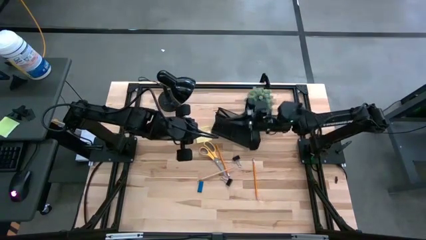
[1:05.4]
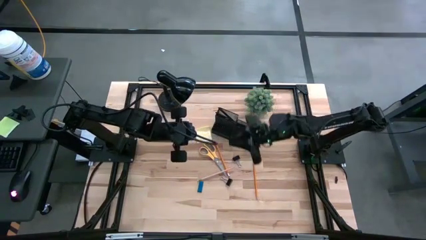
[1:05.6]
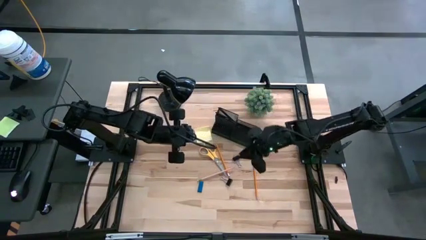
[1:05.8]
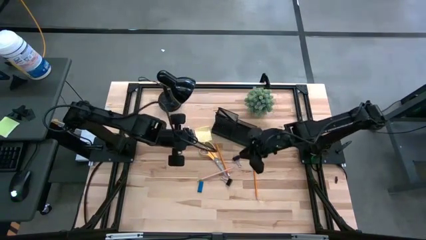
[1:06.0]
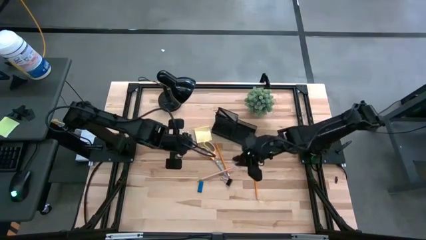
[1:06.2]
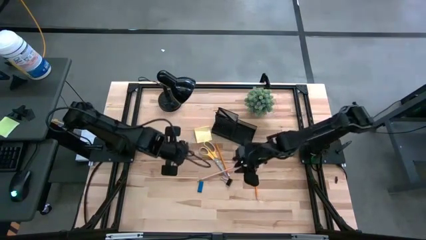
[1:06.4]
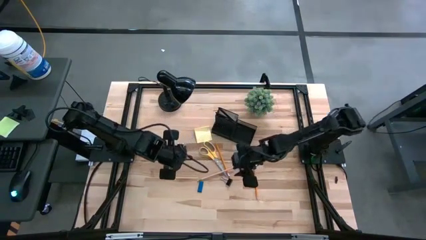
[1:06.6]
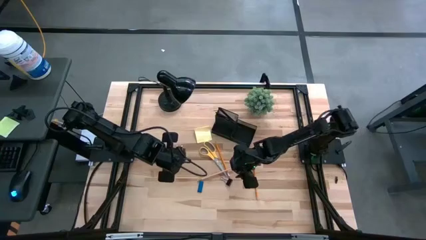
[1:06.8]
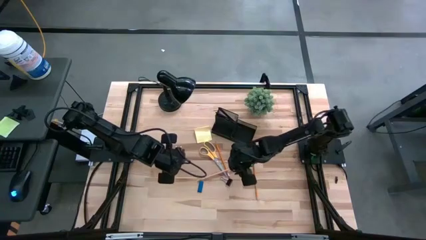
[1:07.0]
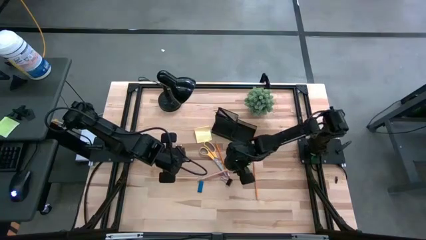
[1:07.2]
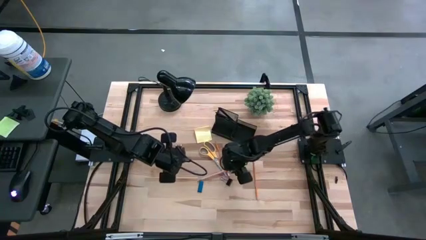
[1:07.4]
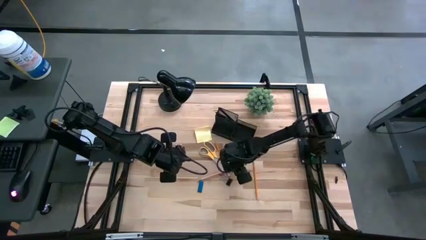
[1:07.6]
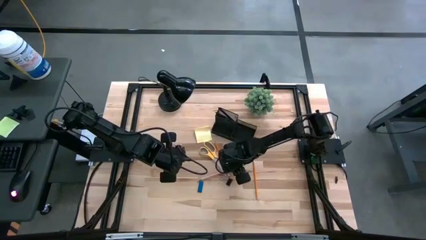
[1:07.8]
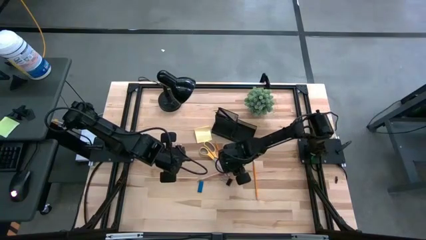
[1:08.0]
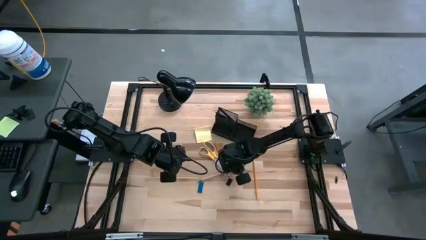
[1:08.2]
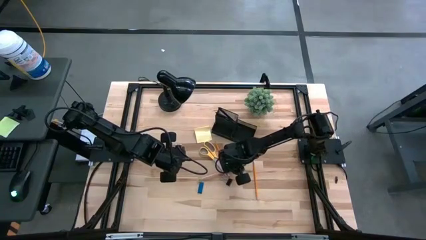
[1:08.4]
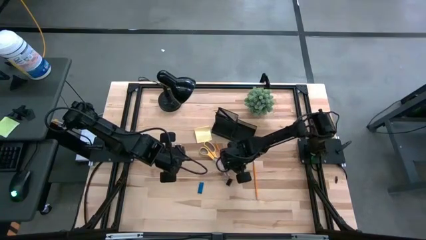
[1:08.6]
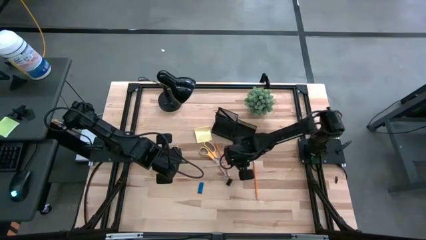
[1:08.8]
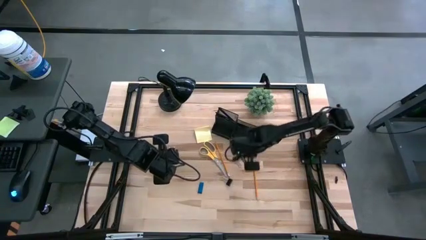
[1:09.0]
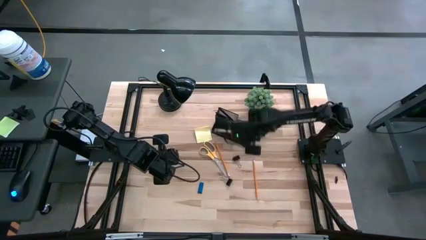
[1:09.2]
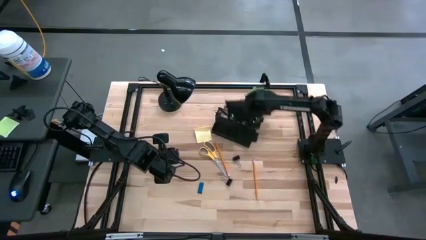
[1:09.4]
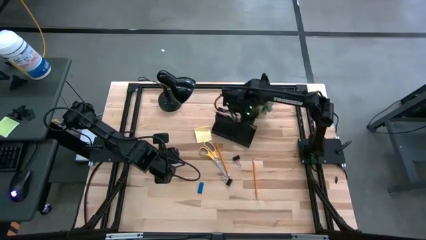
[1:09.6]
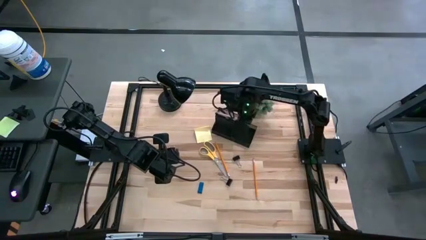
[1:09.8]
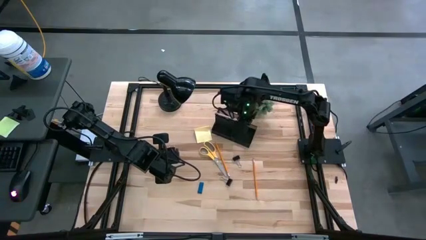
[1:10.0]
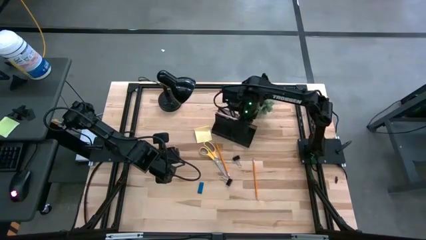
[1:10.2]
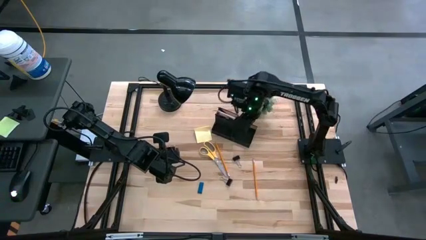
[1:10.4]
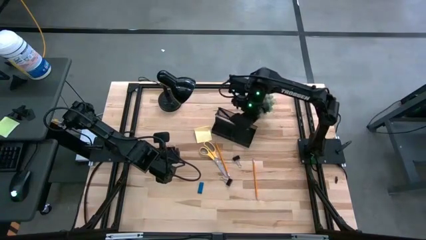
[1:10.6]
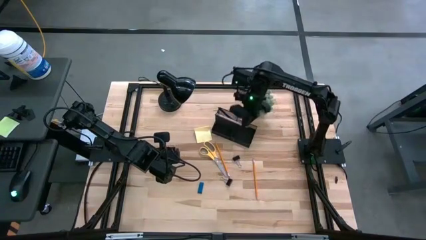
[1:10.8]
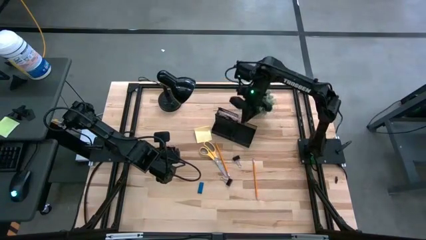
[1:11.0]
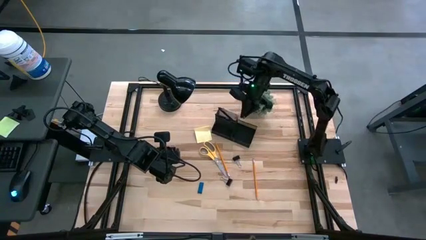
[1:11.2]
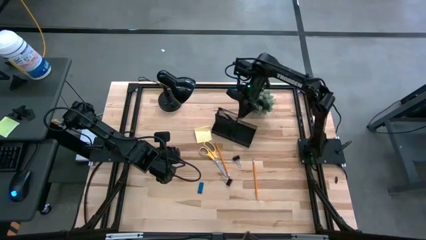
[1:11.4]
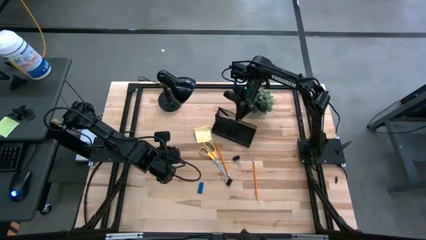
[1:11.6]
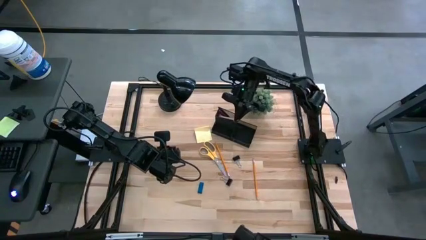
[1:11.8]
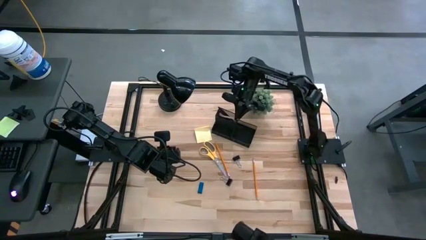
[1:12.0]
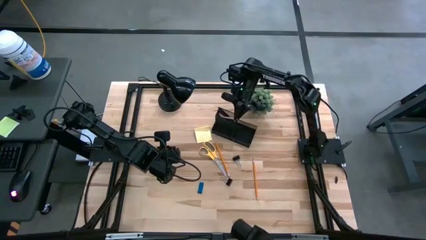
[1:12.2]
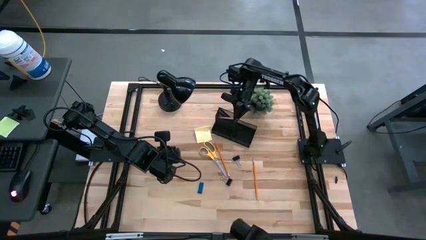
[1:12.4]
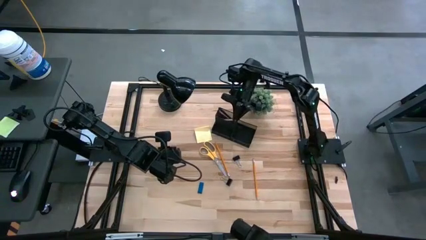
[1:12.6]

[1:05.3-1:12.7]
Task: Pick and place office supplies into organizer
Put the pink pencil into the desk organizer

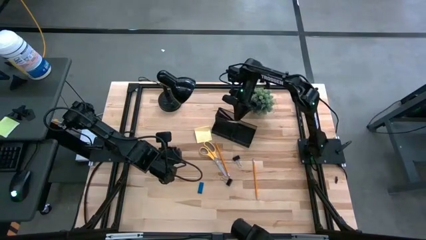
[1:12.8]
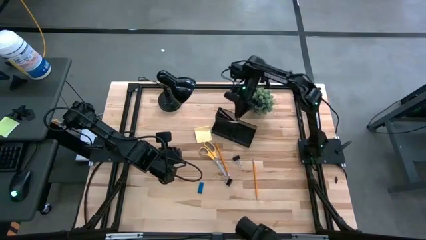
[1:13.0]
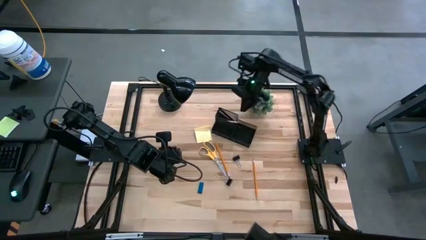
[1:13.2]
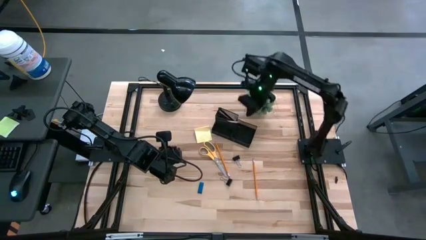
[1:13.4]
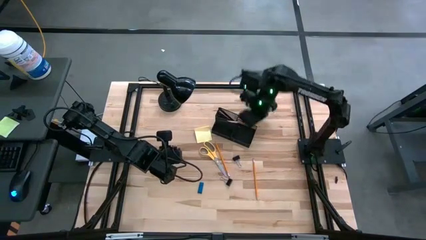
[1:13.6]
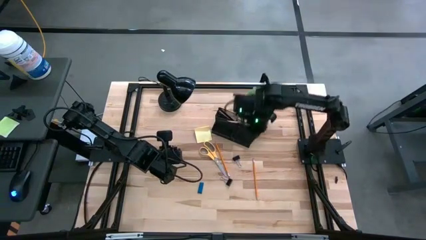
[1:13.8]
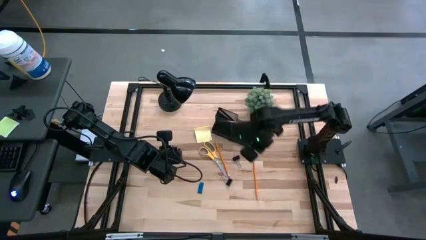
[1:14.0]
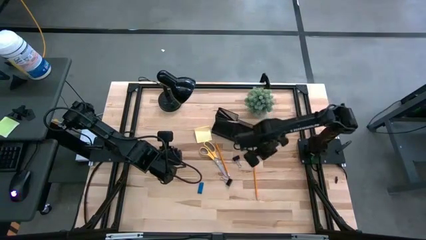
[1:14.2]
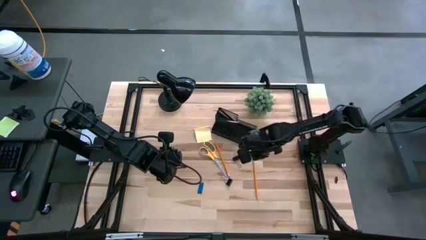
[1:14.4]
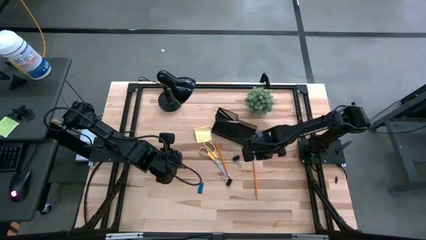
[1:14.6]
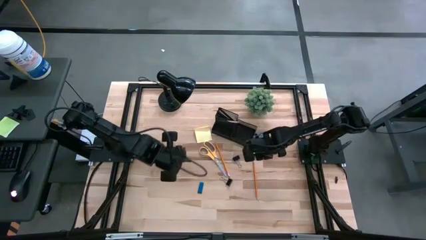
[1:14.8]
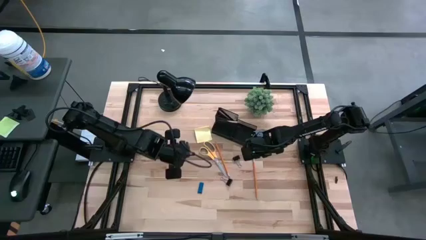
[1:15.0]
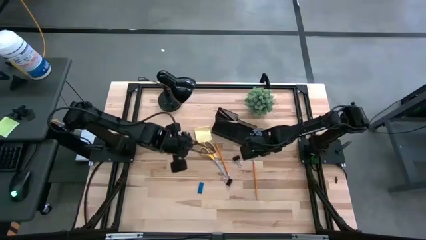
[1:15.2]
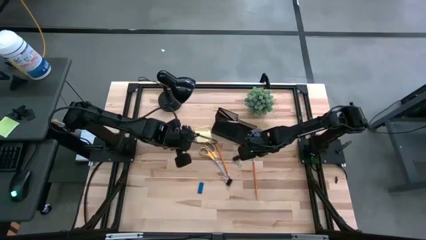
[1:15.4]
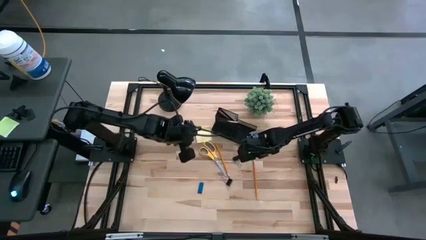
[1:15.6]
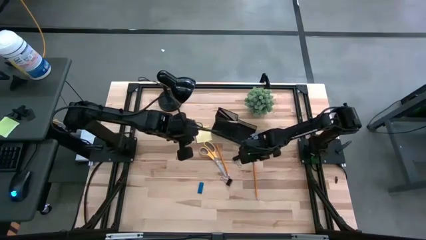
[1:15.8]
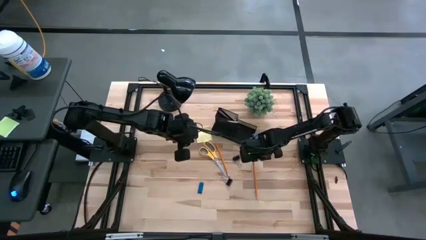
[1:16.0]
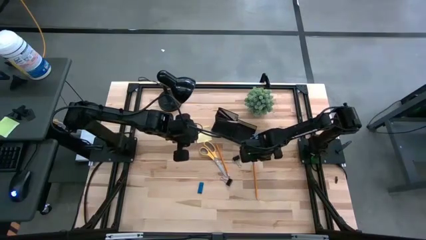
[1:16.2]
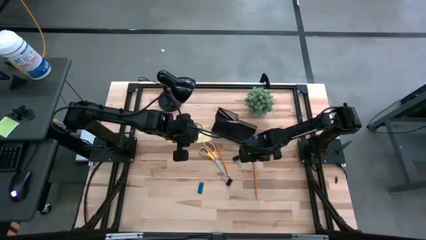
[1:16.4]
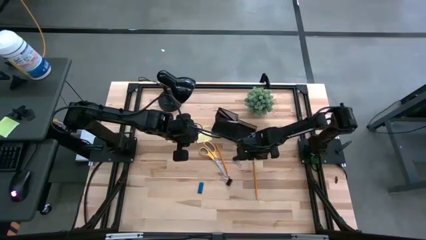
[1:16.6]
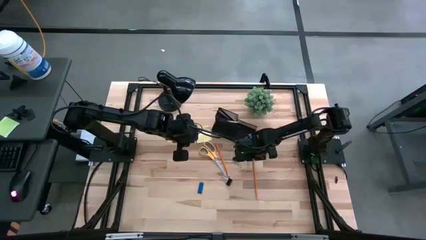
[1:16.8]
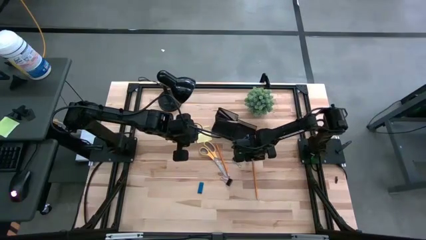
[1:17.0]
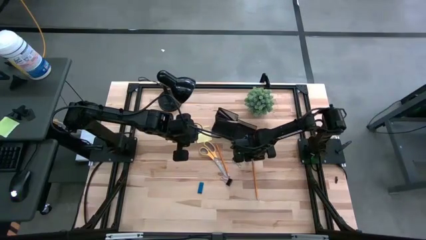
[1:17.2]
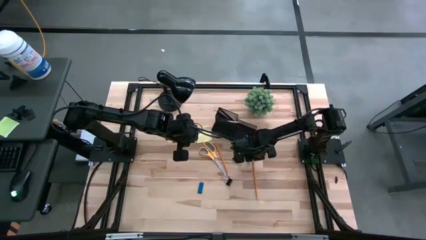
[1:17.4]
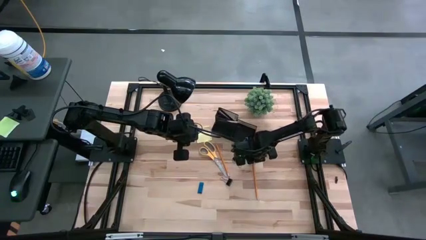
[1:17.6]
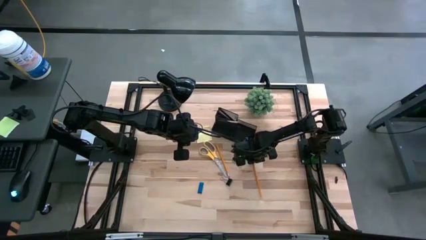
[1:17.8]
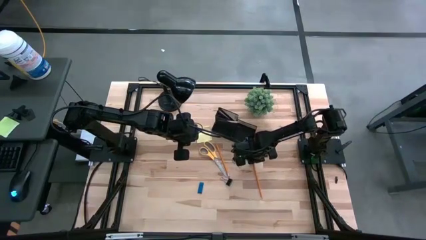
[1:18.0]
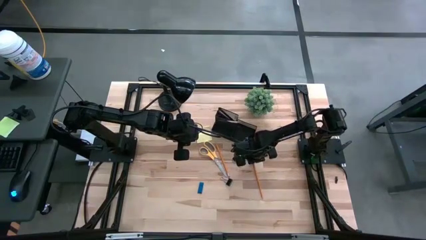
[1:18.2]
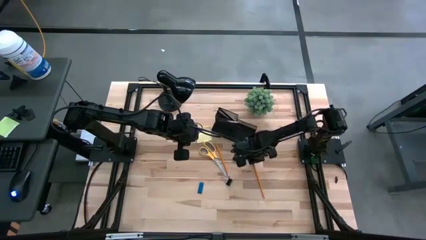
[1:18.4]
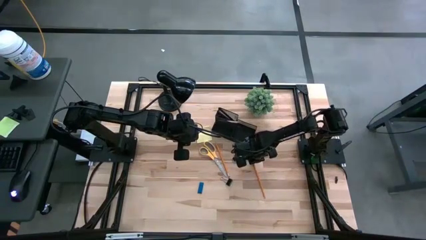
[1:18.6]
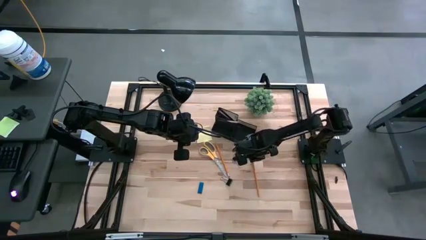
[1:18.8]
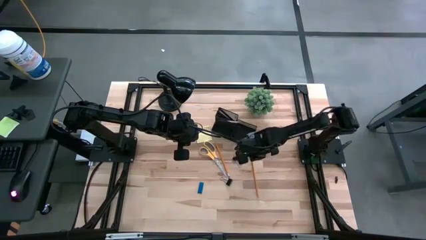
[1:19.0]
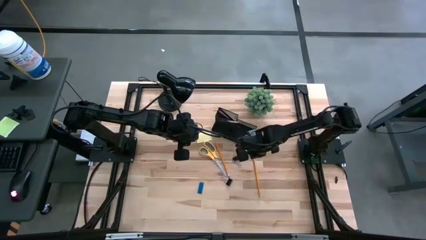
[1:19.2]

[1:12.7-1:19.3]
Put the right yellow pencil into the desk organizer

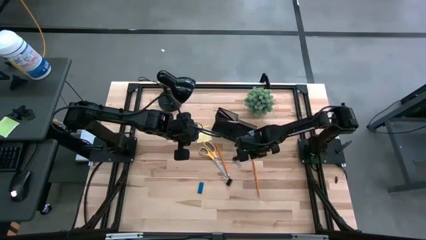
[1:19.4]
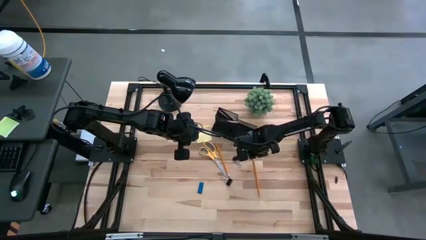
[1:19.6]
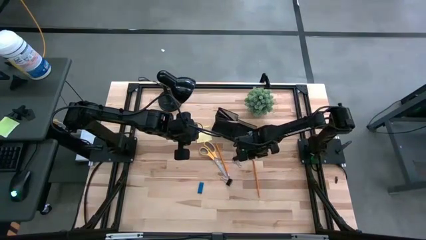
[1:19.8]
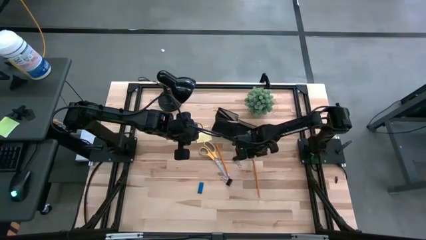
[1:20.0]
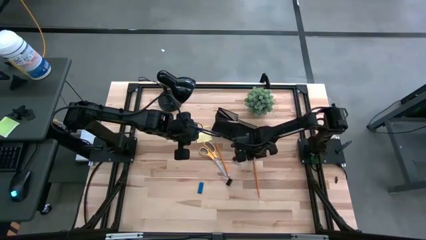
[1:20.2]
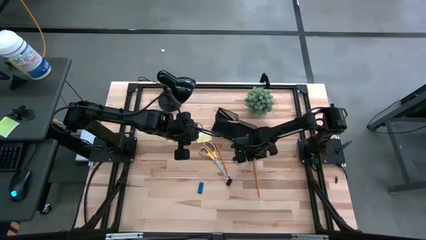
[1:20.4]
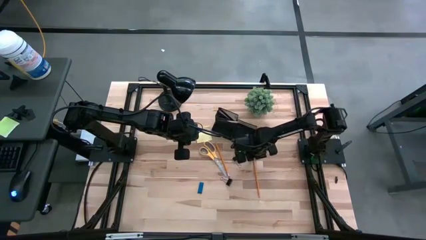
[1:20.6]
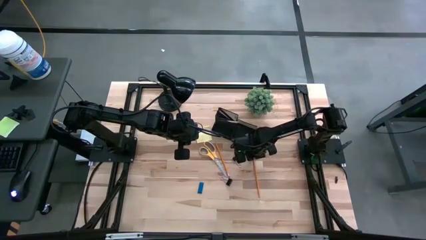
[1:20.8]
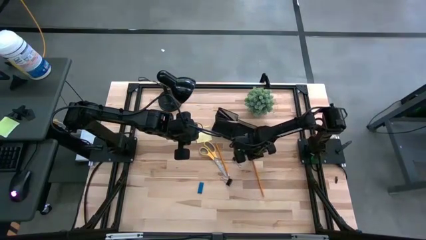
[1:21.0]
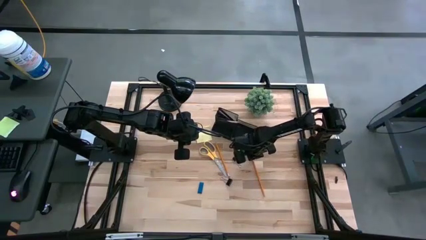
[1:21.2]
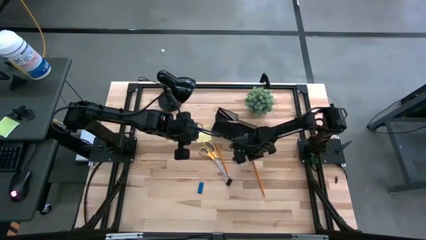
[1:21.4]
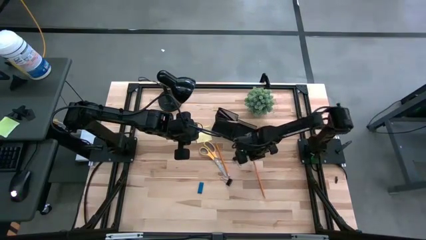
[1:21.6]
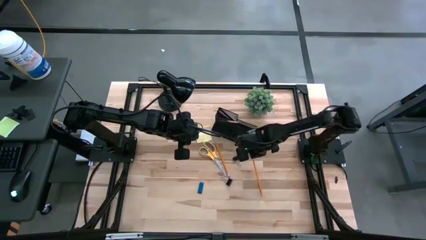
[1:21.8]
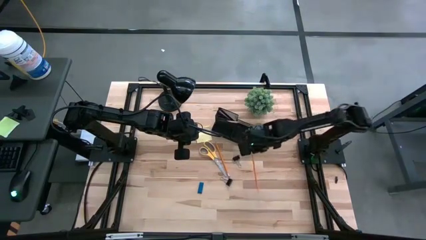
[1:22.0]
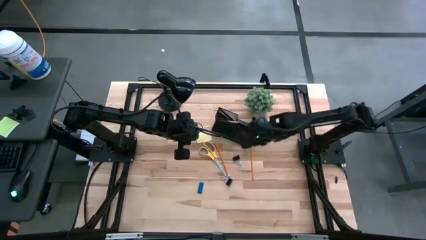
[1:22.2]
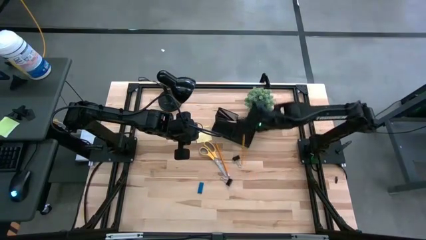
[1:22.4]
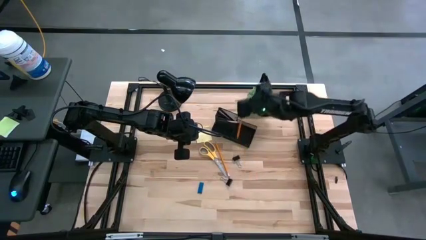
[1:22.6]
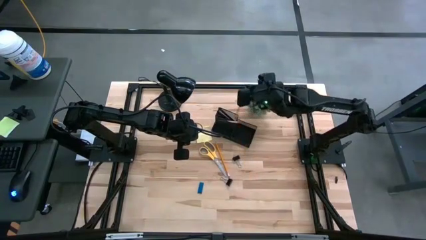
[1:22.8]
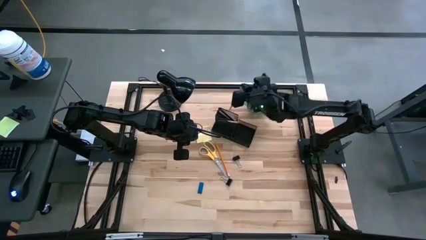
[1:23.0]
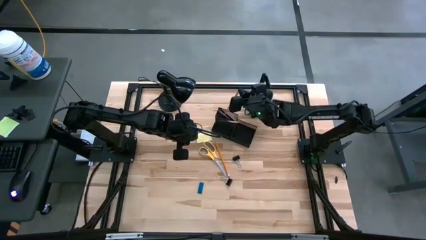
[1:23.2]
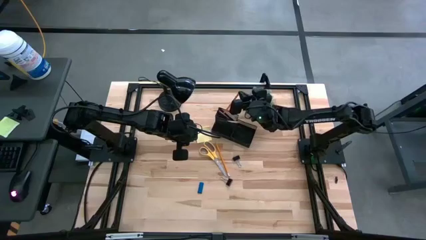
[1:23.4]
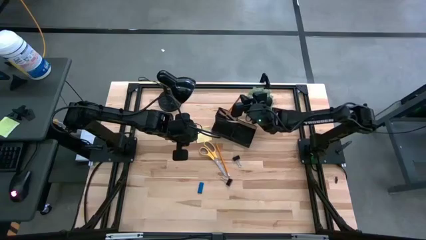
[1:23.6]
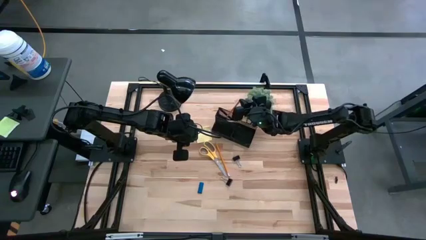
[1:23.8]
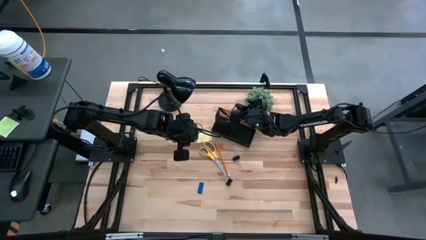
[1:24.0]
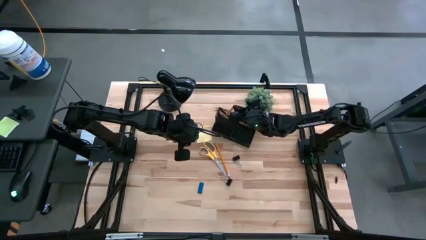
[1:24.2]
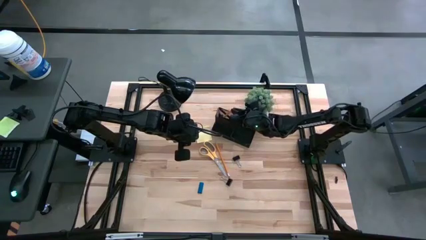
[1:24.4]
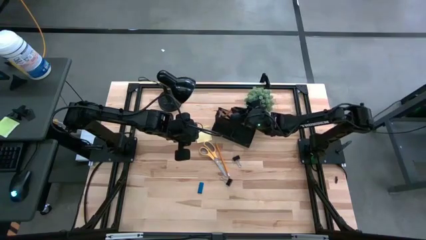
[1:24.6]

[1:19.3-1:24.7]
Put the right yellow pencil into the desk organizer
